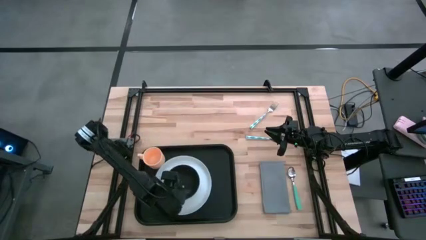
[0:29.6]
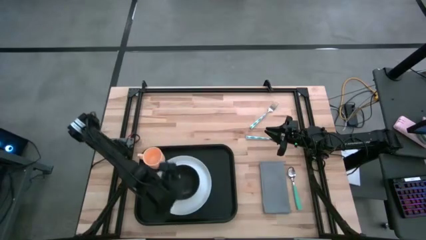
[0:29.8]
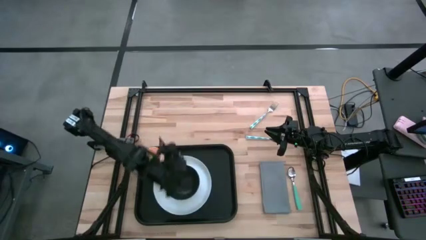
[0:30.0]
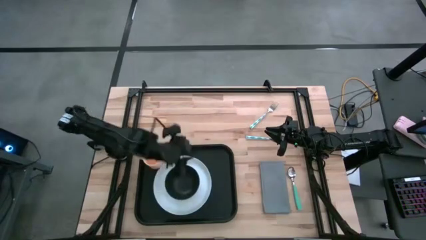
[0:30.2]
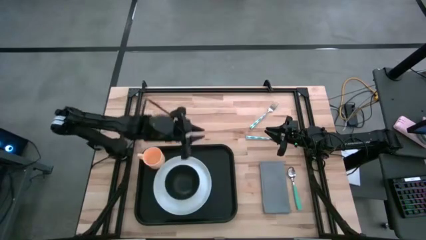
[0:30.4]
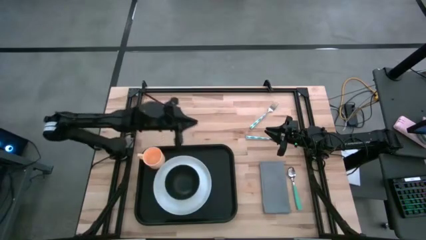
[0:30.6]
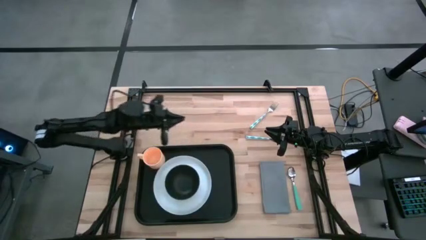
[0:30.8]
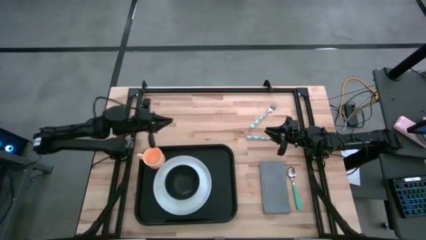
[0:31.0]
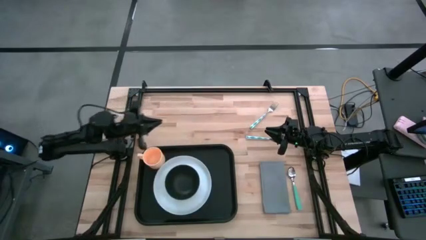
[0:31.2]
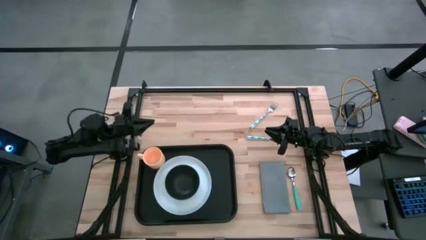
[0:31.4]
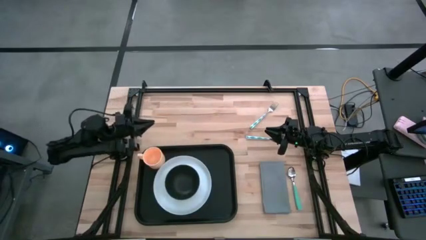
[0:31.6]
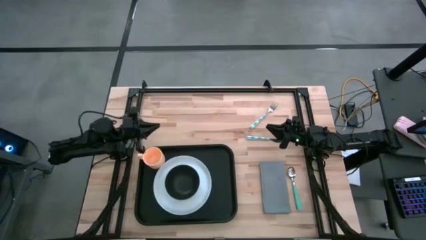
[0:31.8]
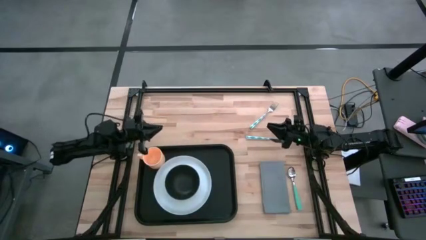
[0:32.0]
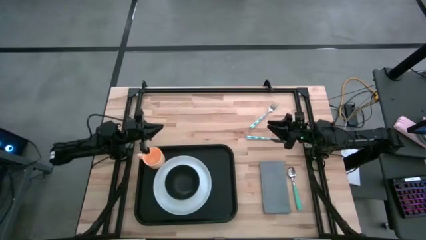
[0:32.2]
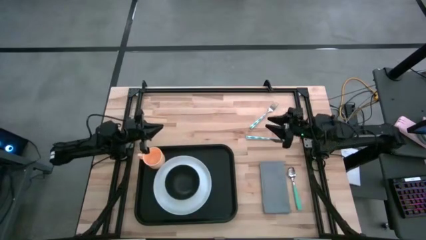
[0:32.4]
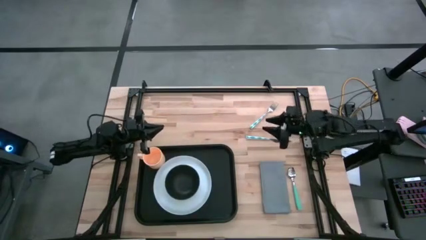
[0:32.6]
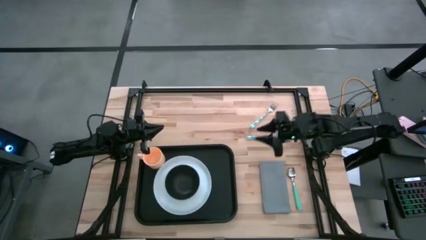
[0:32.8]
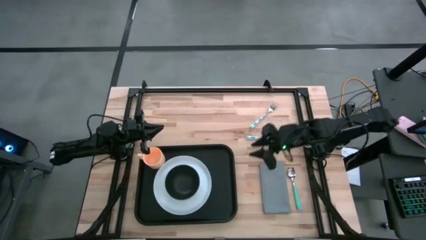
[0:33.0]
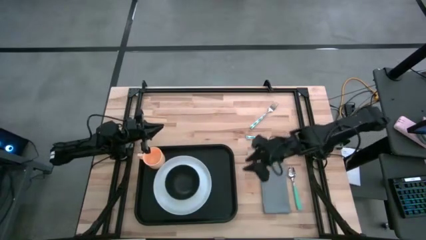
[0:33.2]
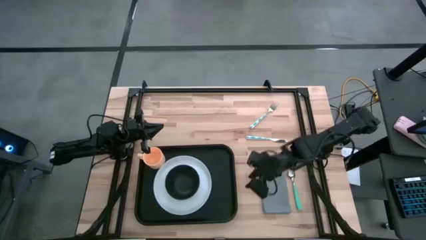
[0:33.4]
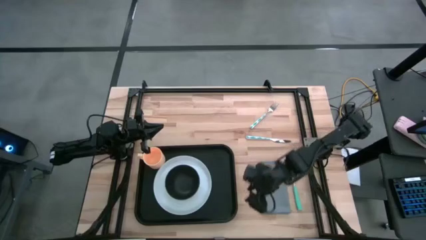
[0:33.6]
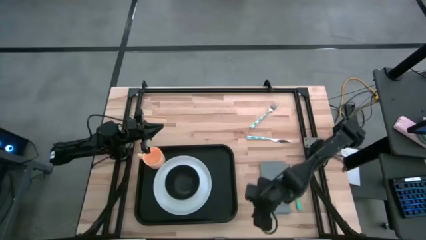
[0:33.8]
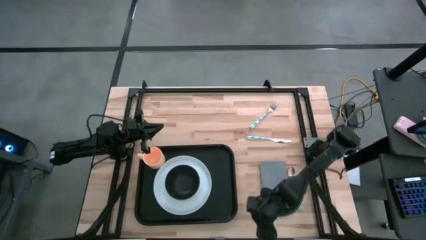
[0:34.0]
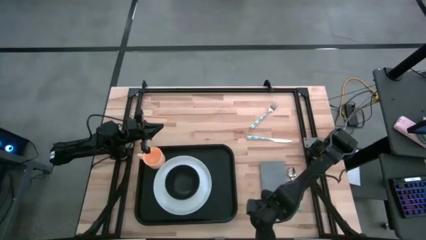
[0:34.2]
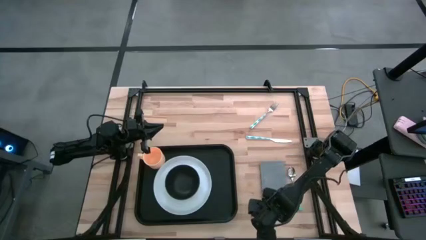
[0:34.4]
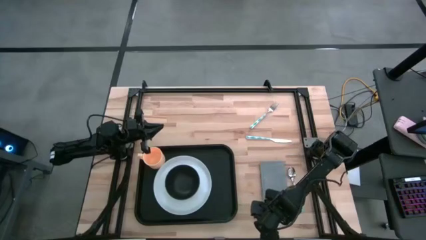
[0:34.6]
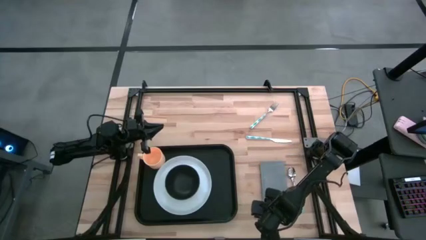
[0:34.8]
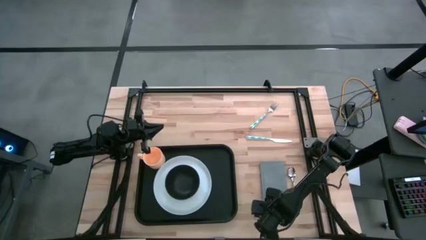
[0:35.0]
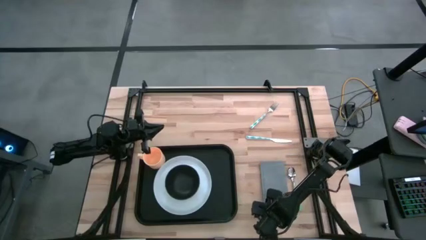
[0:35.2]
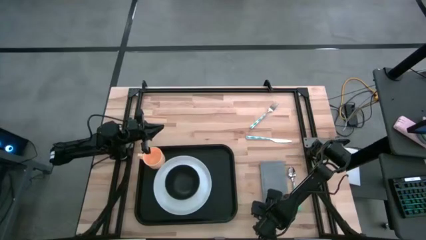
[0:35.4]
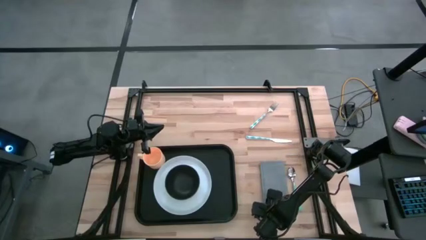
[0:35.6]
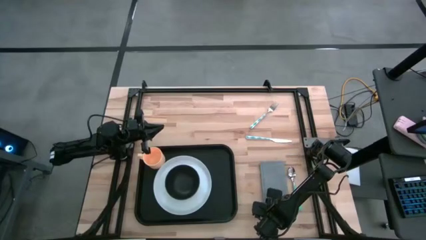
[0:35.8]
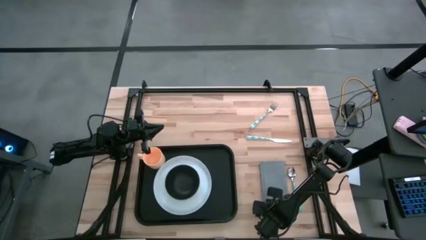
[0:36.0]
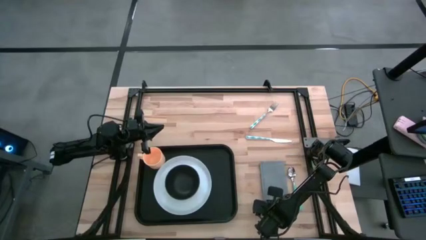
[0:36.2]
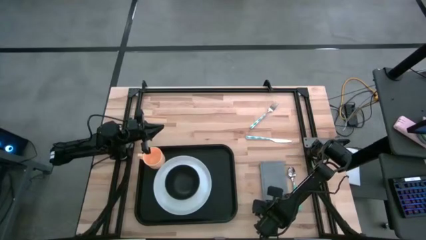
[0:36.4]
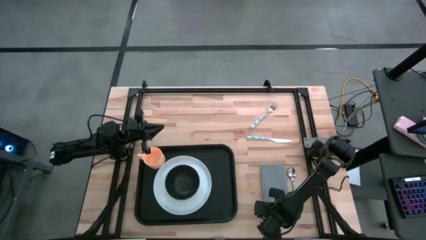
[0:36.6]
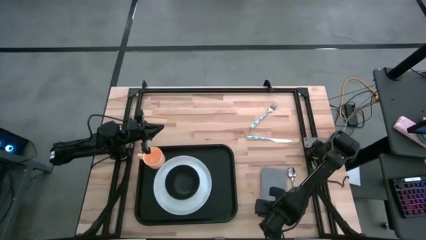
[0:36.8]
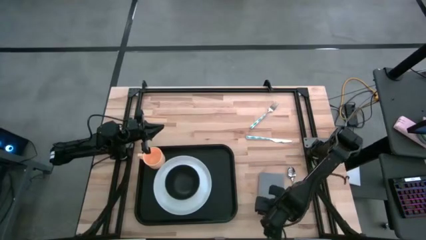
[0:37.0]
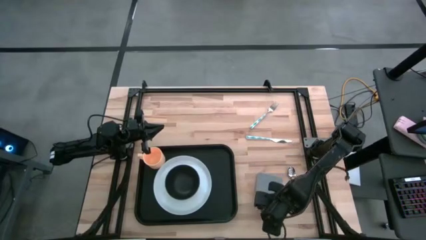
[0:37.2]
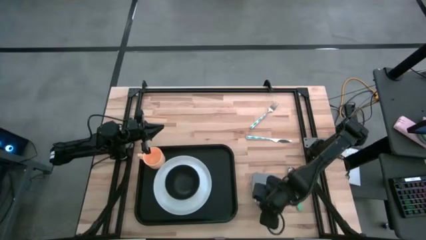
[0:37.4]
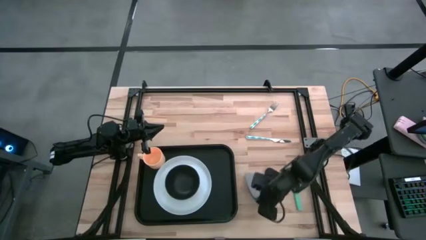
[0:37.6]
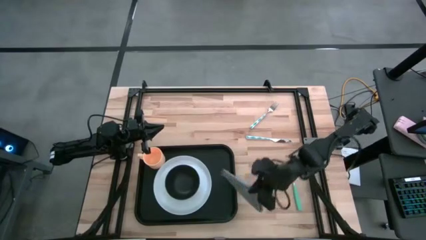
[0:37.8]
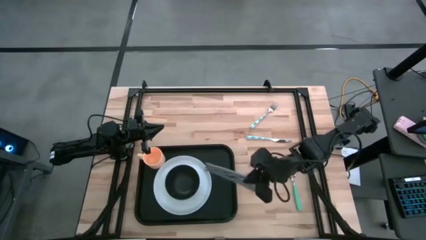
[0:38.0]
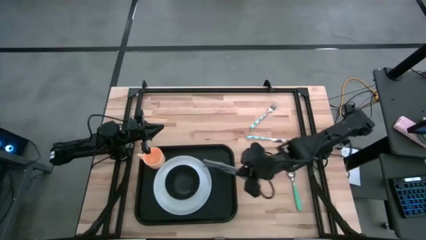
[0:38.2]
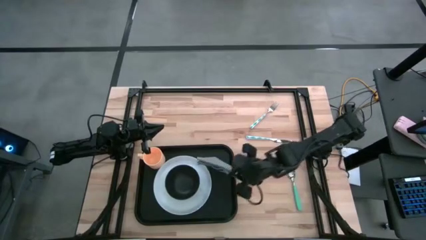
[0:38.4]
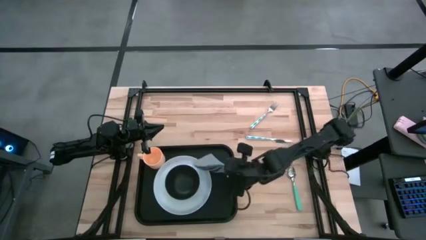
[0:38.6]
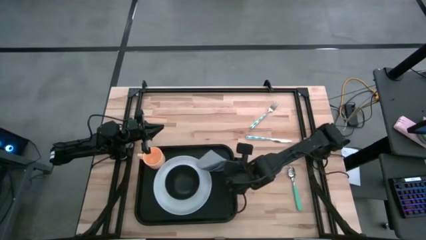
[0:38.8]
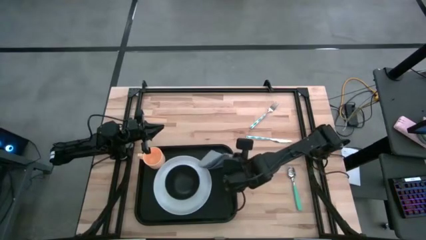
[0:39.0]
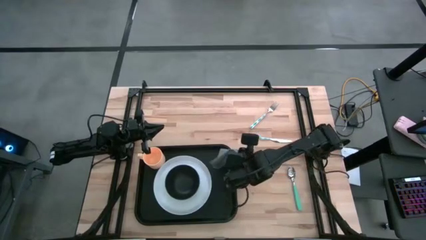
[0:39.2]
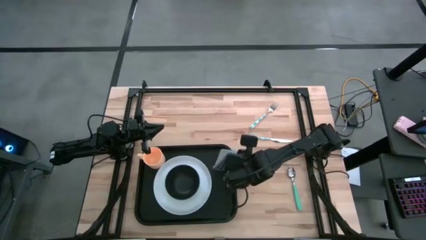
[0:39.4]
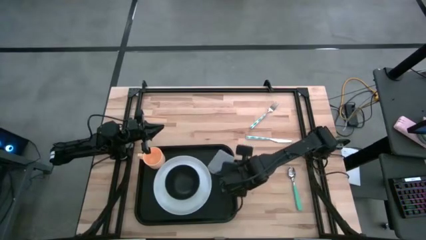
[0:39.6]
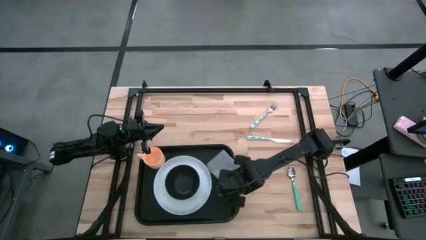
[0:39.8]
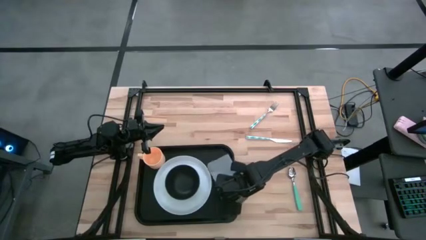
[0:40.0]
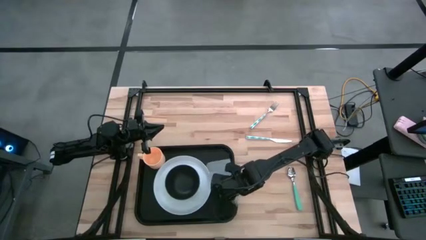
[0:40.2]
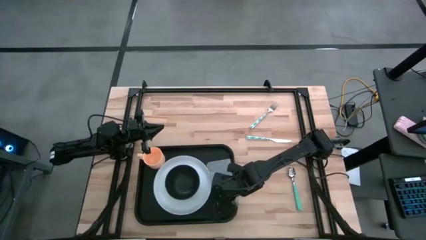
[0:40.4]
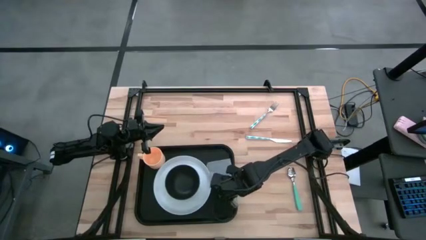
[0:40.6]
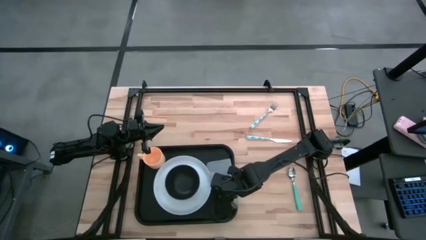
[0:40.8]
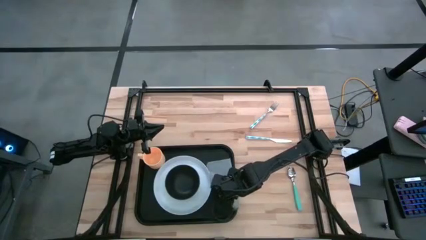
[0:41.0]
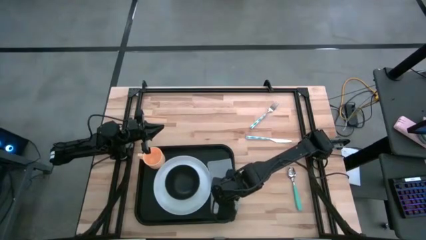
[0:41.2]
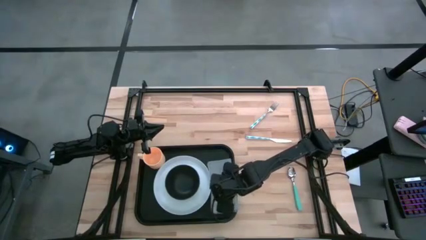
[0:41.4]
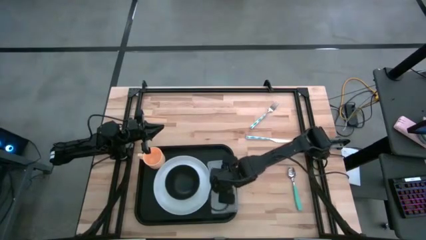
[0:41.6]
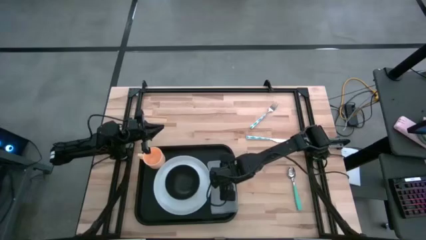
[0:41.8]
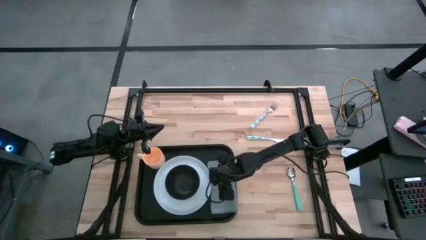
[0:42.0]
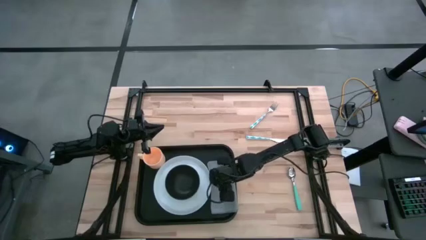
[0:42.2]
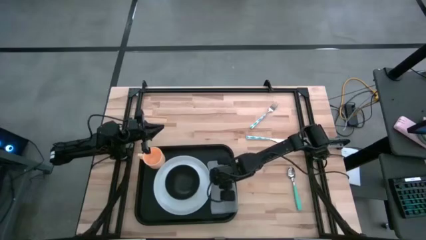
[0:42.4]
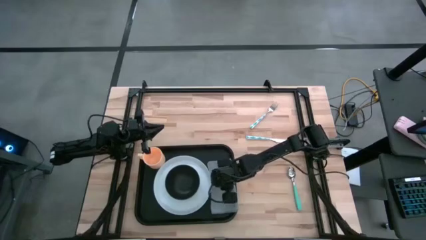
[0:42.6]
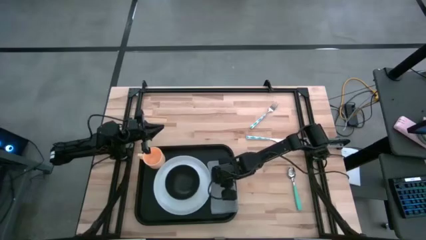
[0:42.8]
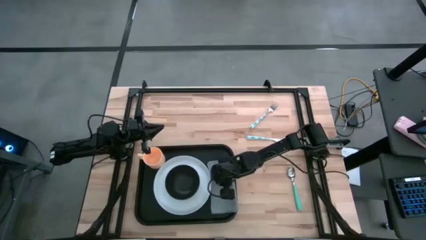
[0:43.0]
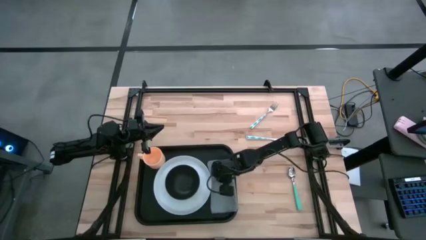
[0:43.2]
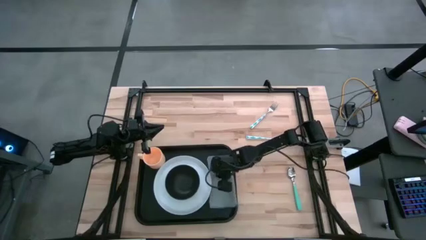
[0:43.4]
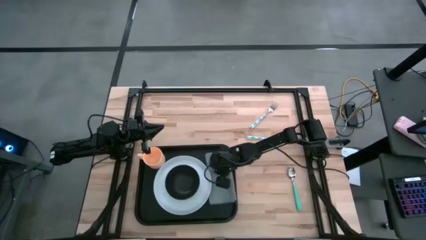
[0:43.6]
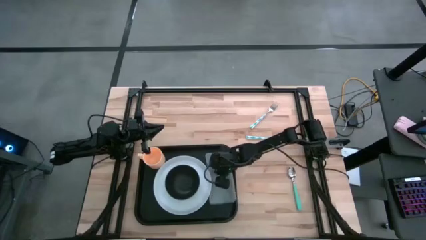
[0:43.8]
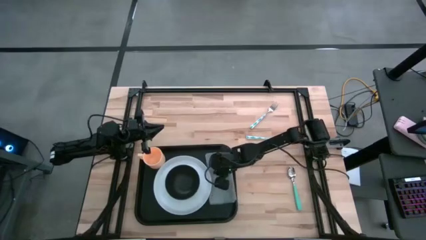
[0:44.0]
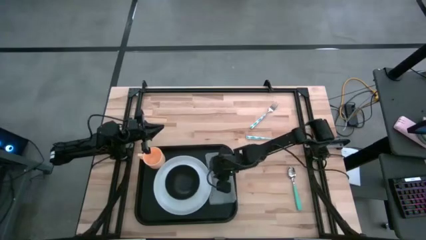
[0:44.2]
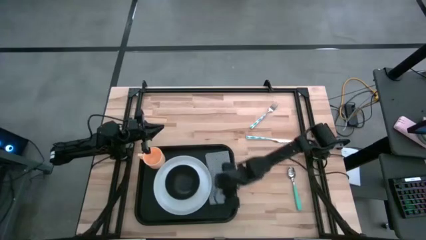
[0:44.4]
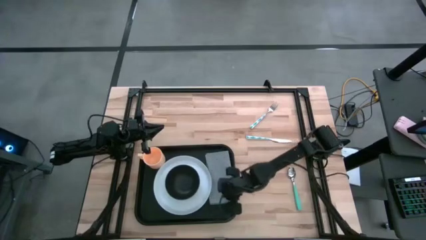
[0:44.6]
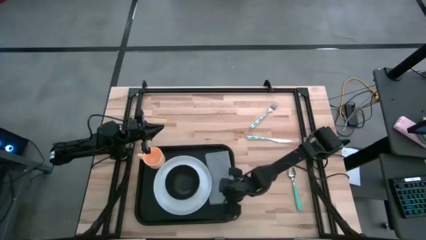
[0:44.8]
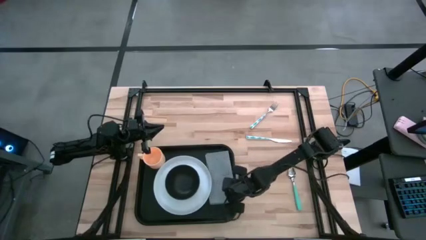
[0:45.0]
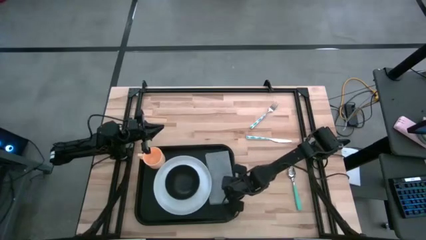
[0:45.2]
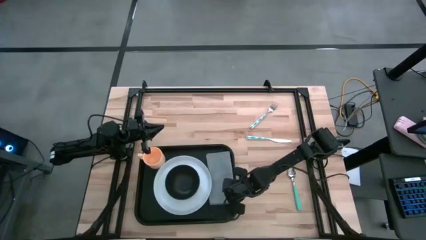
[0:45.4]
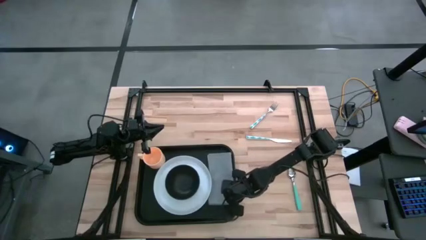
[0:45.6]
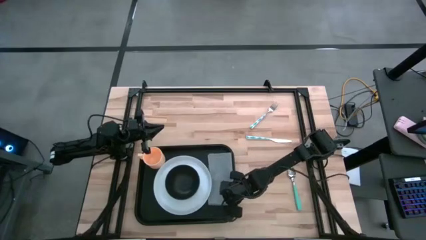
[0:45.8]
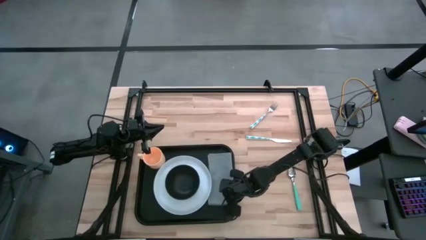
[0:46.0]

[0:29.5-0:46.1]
Task: Set up tray
Put the gray napkin on the black serving tray to the right of the white plate
